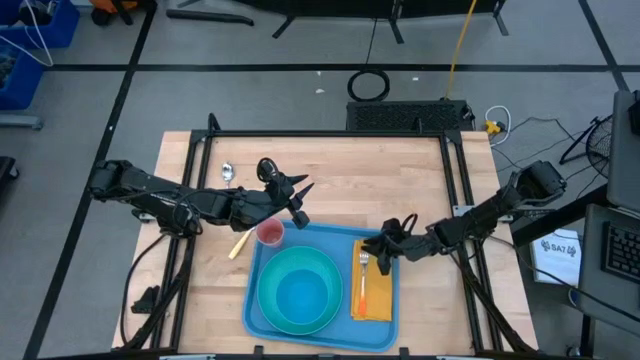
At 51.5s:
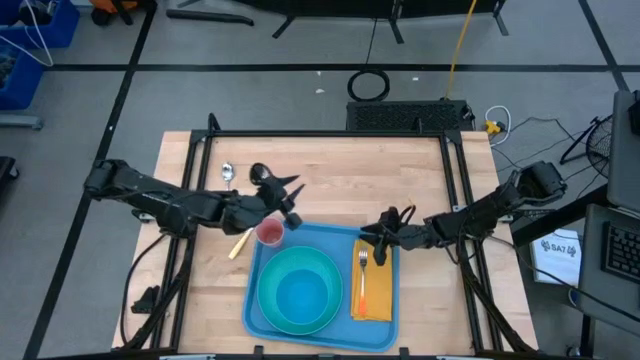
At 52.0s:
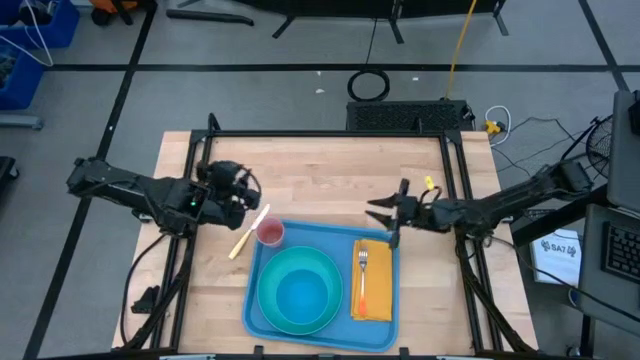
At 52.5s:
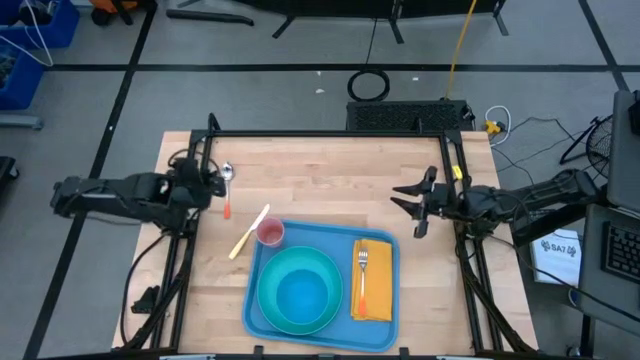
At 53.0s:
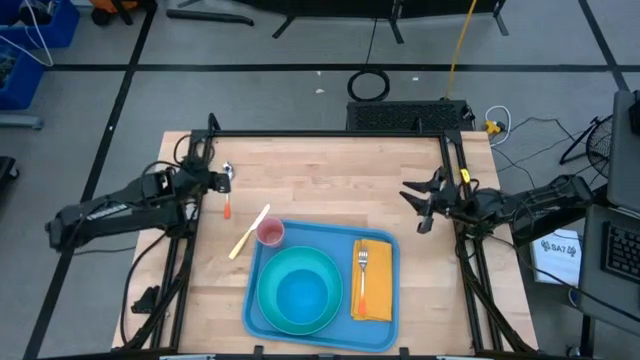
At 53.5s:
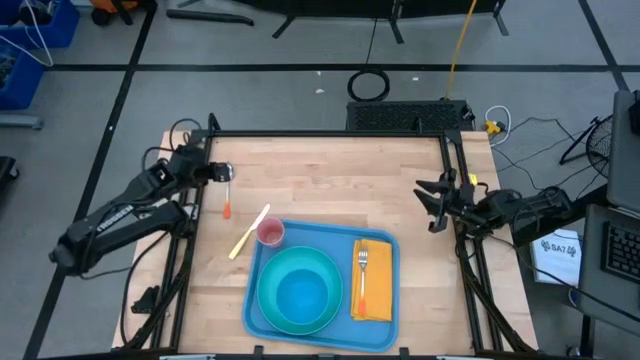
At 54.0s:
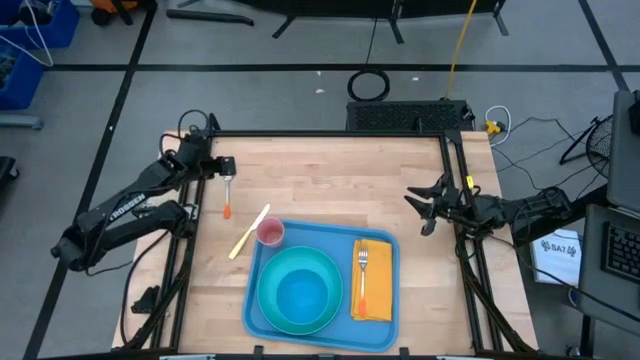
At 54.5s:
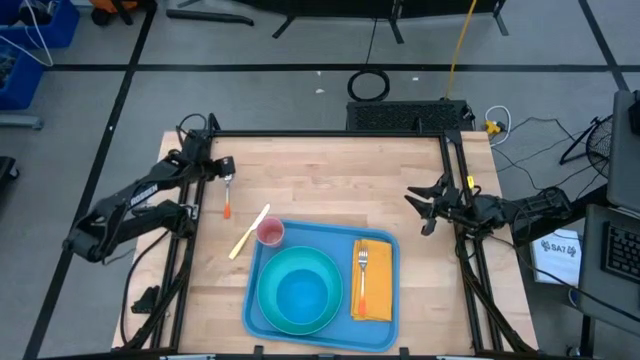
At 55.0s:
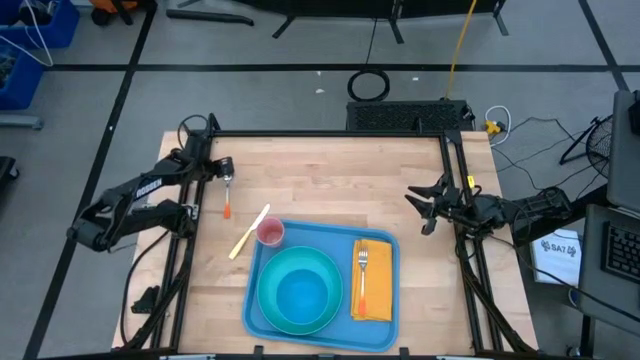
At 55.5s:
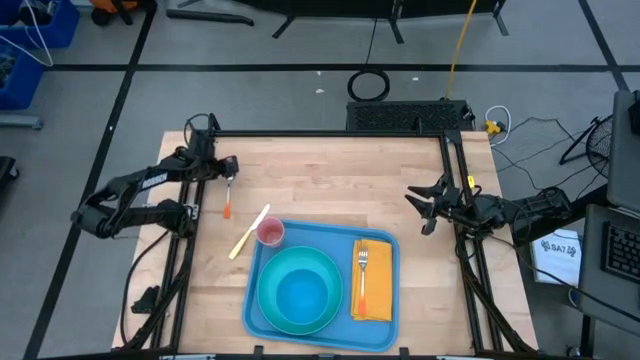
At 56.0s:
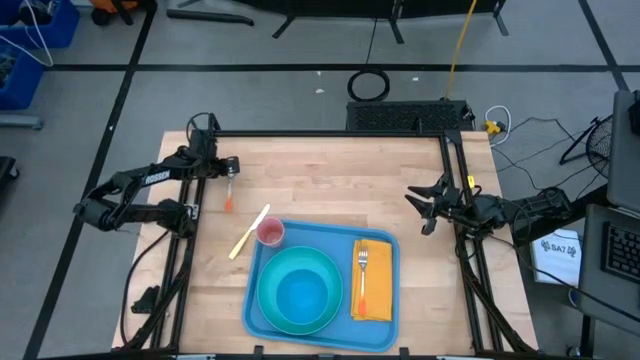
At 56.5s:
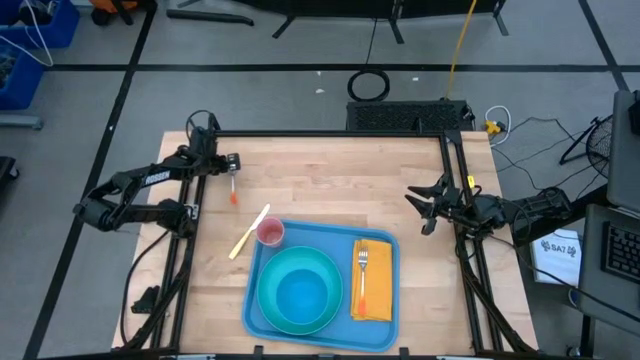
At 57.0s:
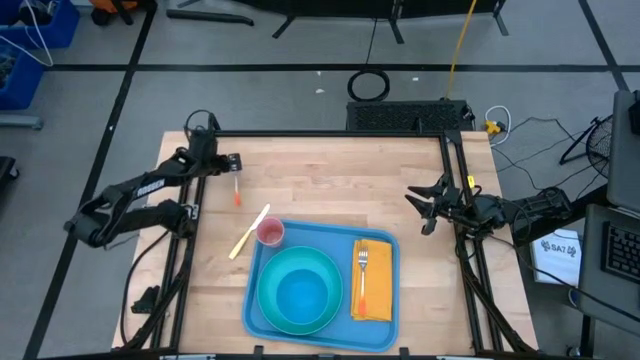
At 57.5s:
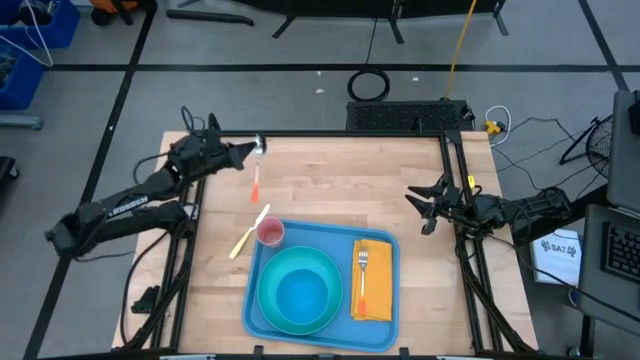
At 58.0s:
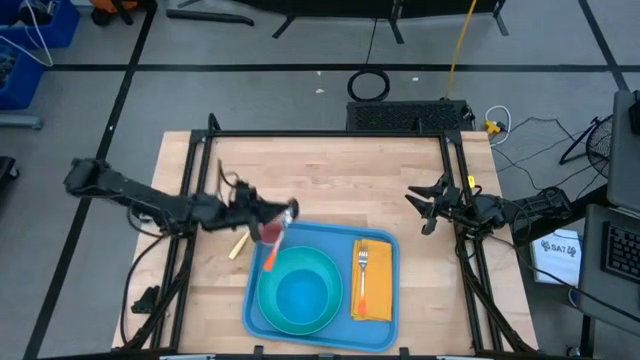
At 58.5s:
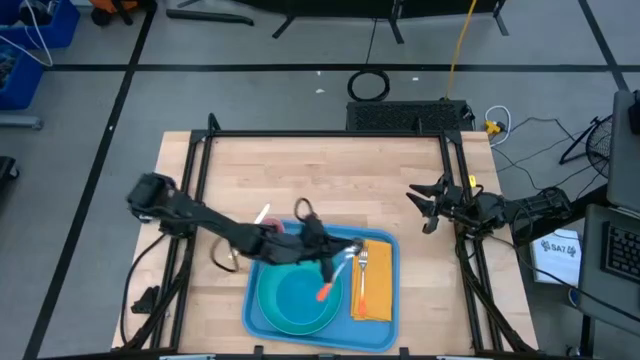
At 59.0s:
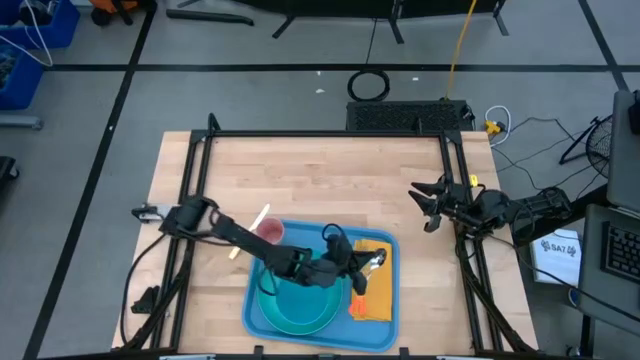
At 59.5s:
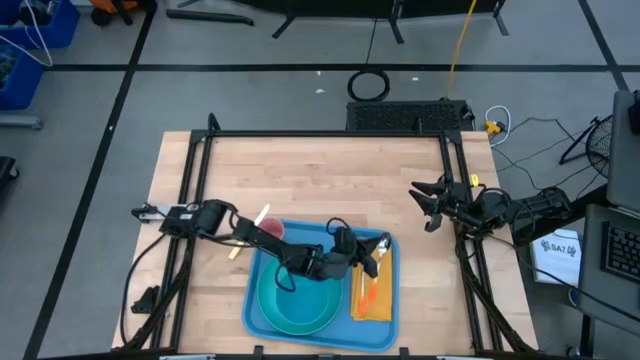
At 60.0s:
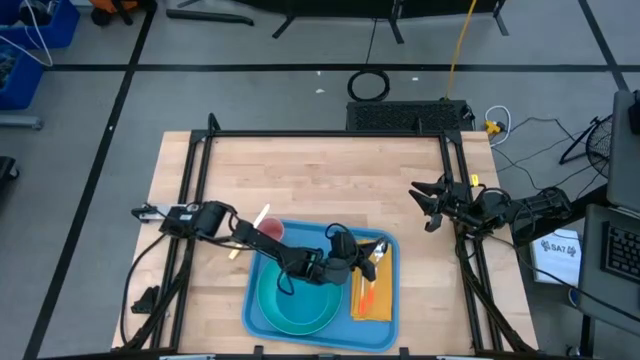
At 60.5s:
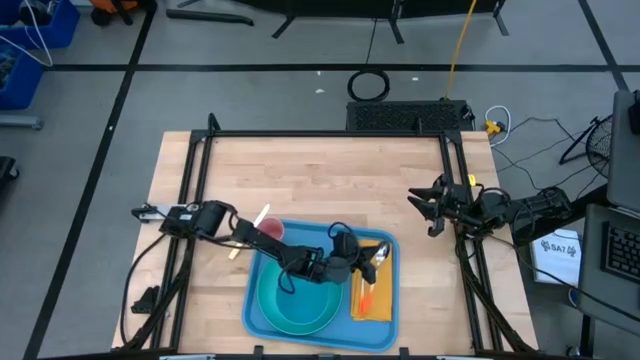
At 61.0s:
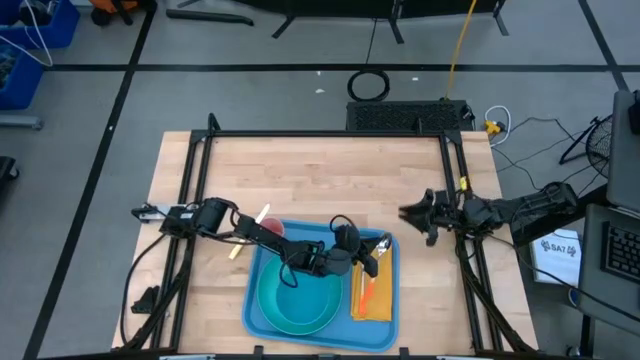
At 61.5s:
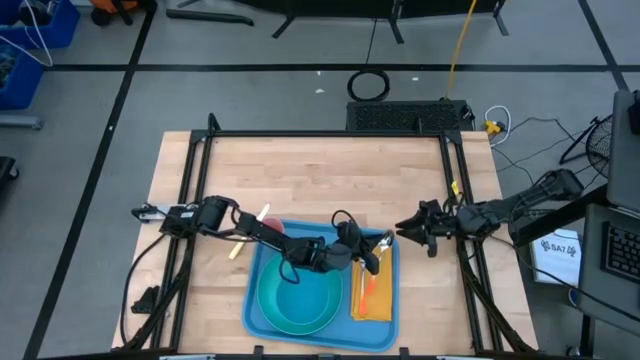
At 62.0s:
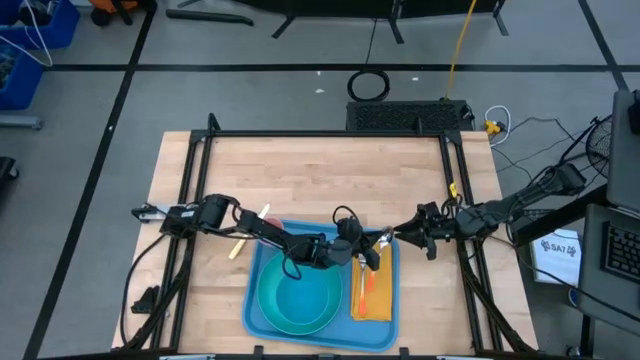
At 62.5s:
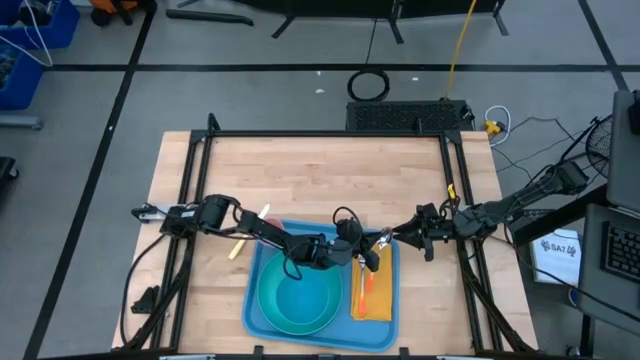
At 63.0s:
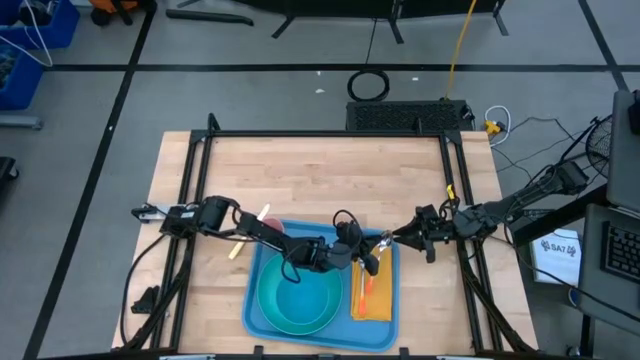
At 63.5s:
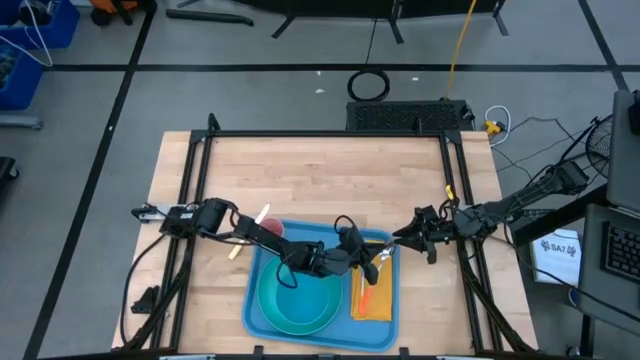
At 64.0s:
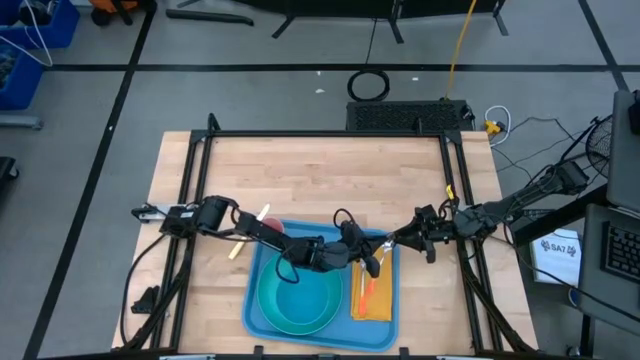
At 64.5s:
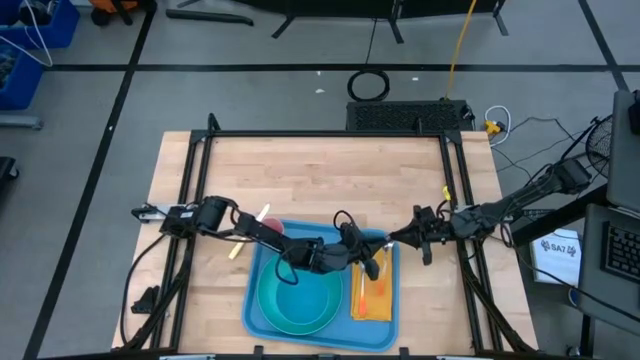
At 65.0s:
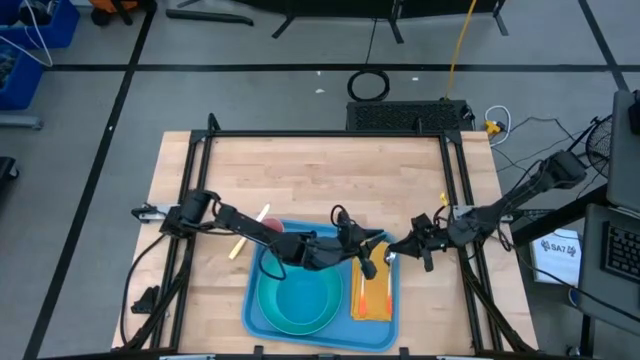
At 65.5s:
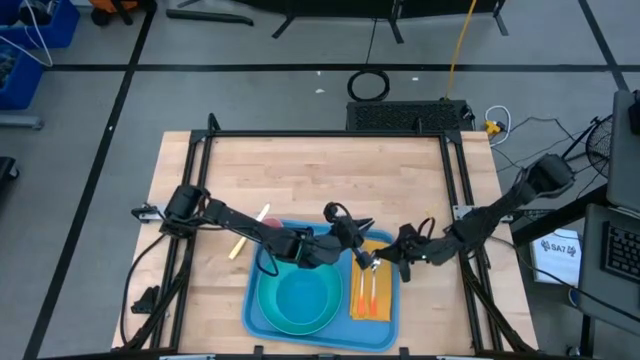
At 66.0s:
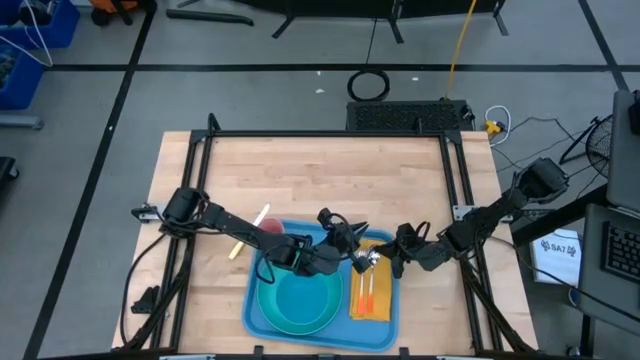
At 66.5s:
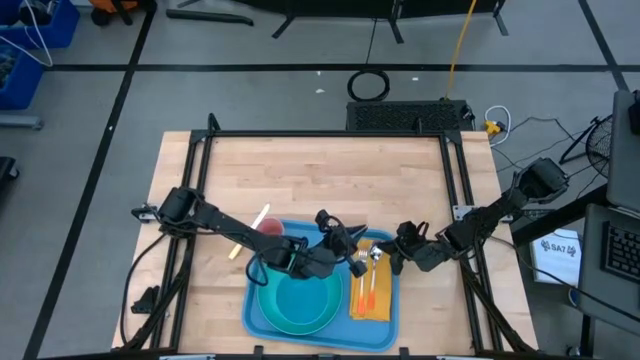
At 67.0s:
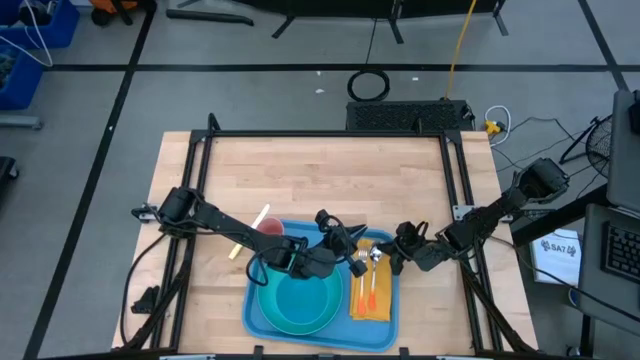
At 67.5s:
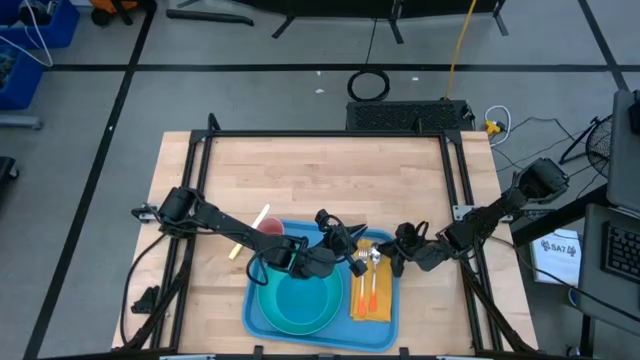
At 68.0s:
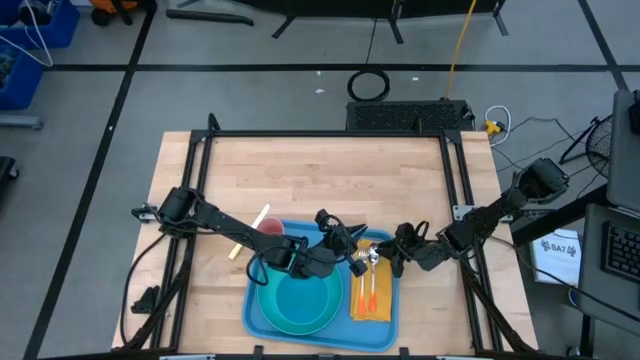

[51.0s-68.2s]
Task: Set up tray
Put the orange spoon on the yellow napkin to the right of the orange fork

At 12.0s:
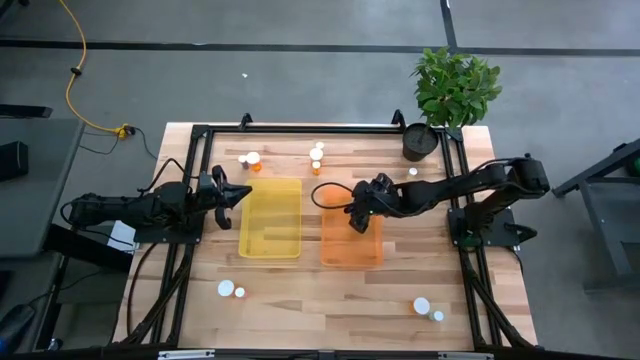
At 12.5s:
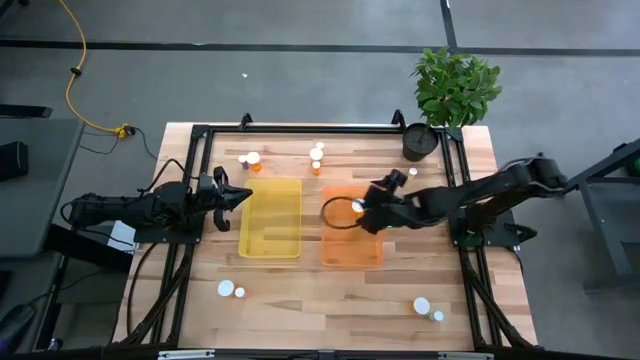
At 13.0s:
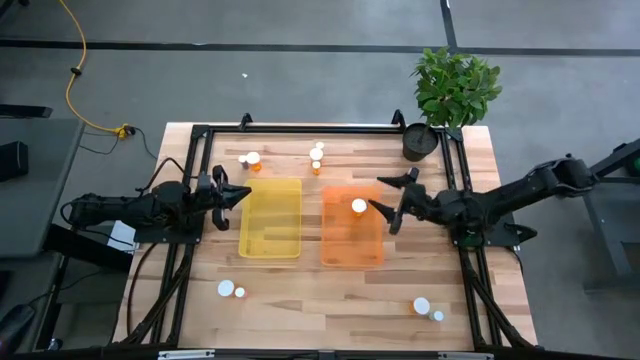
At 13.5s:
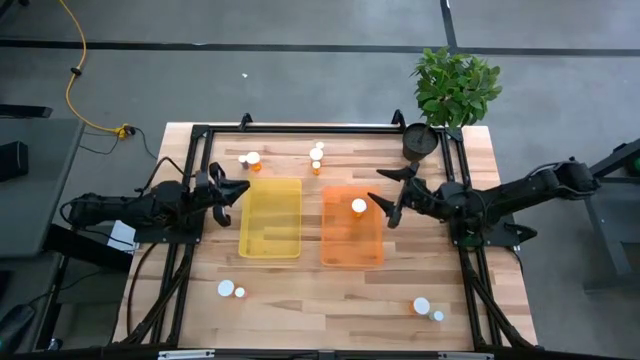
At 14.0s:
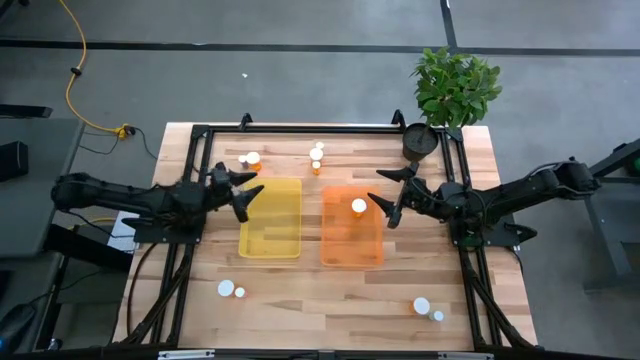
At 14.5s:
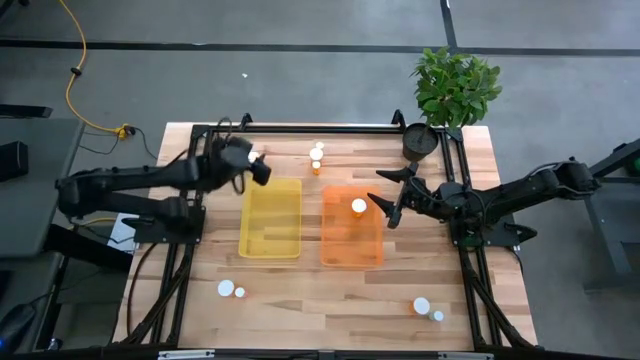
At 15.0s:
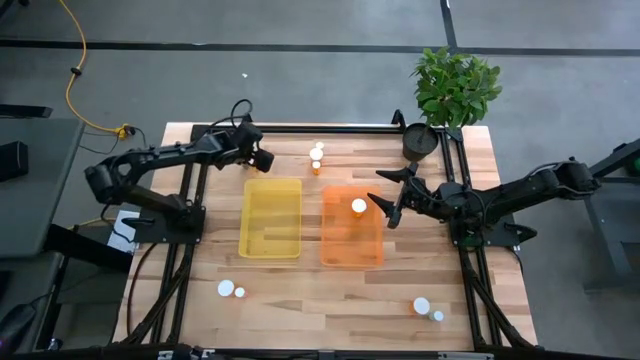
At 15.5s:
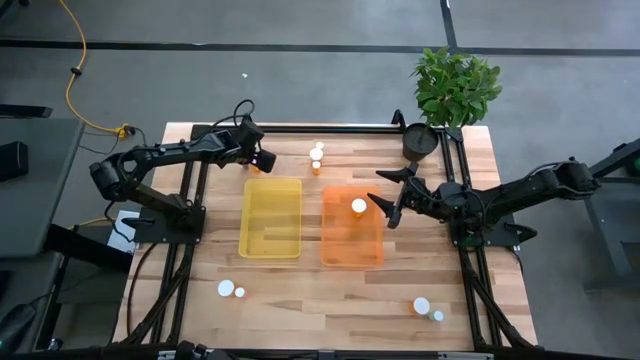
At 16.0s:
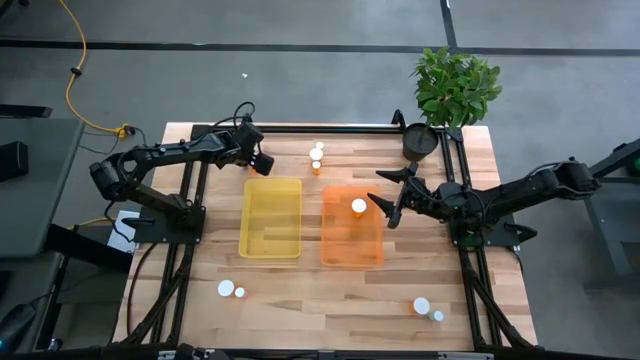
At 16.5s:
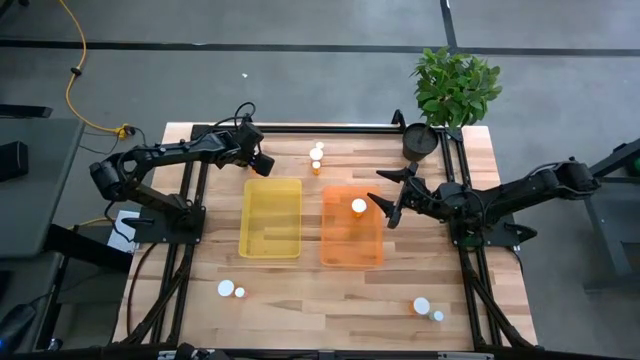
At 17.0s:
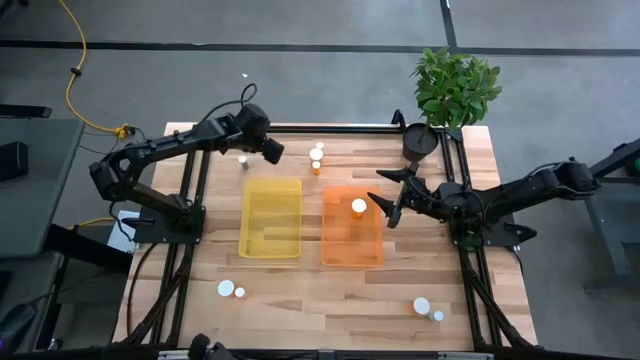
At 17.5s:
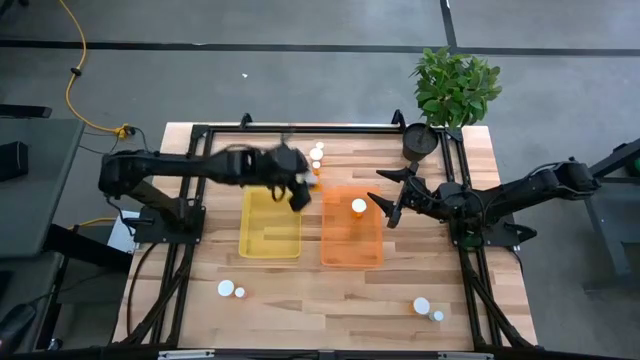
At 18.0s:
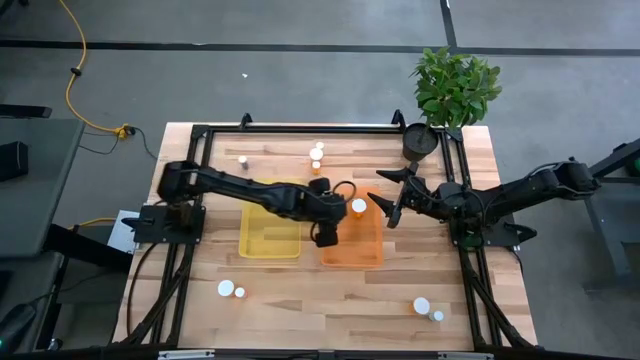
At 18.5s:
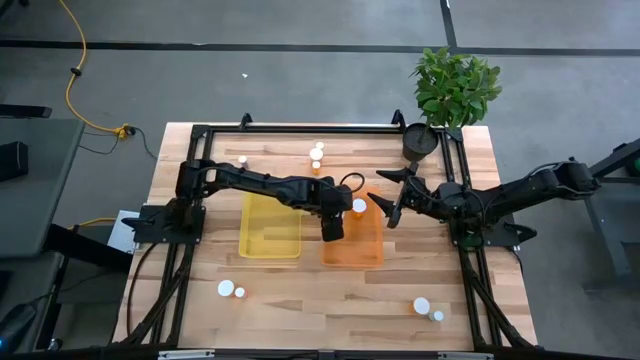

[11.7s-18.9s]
Task: Pick and place medicine bottles into bin by pill shape (circle, oval)
Put the Orange bottle pill into the left bin
